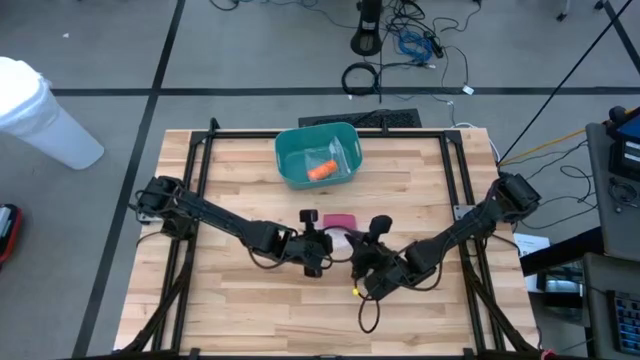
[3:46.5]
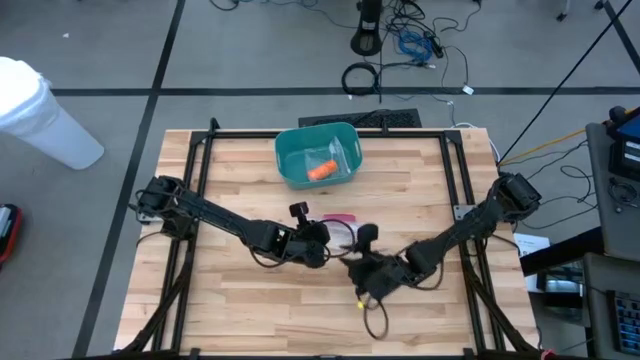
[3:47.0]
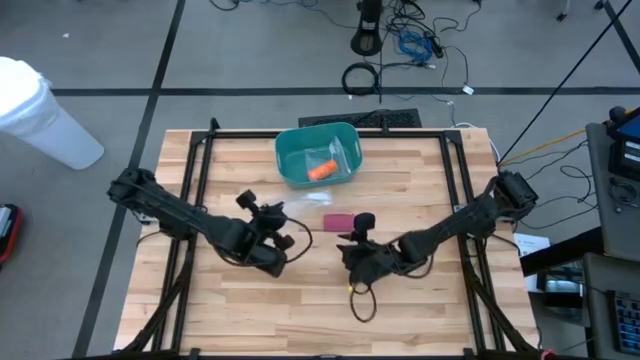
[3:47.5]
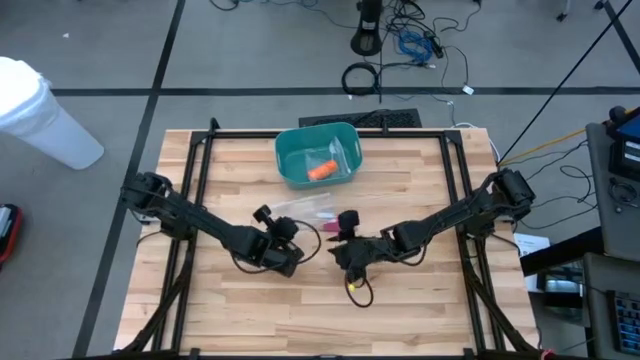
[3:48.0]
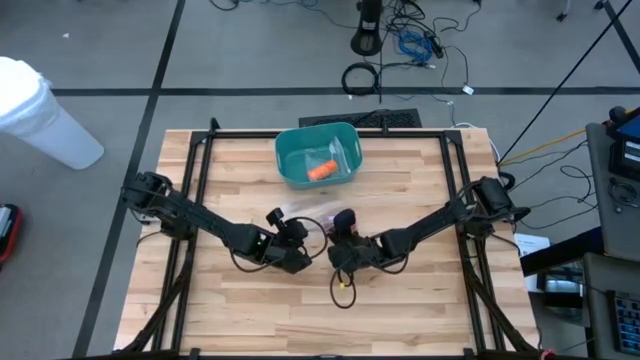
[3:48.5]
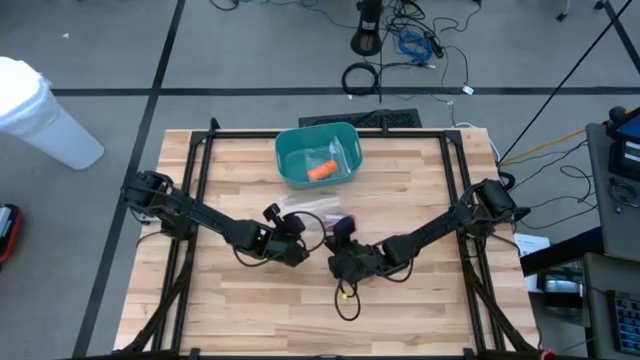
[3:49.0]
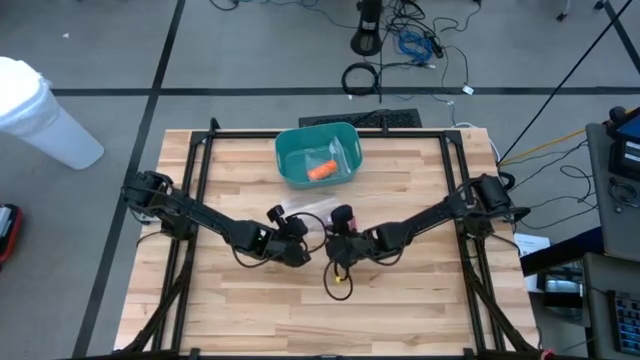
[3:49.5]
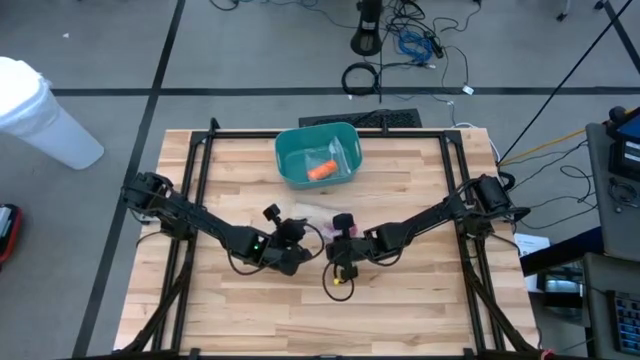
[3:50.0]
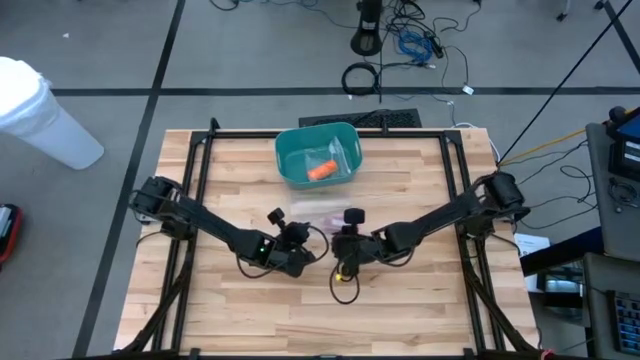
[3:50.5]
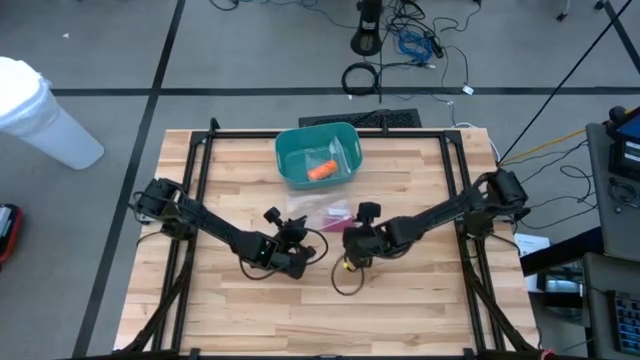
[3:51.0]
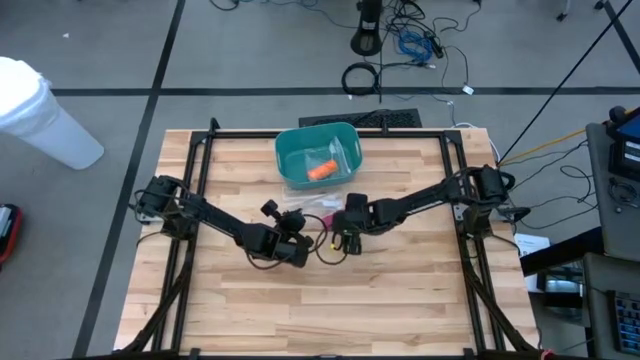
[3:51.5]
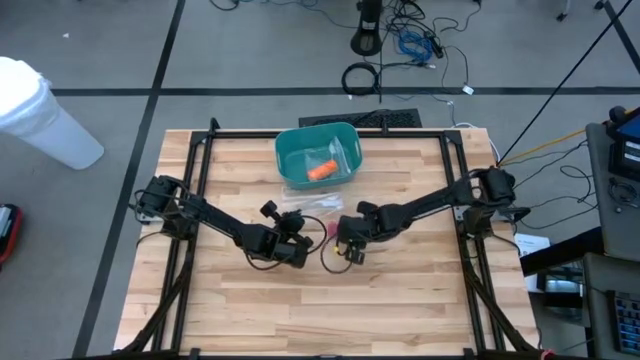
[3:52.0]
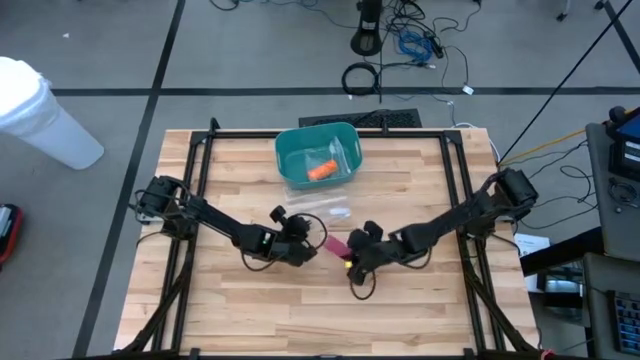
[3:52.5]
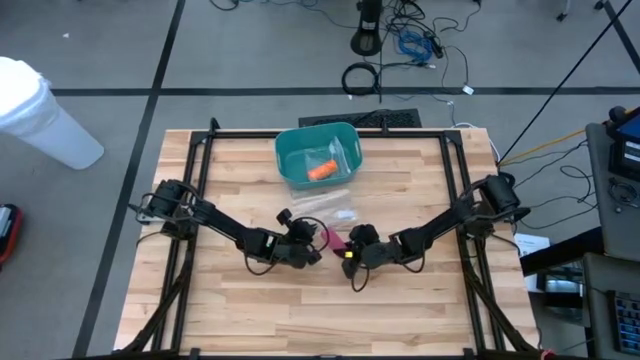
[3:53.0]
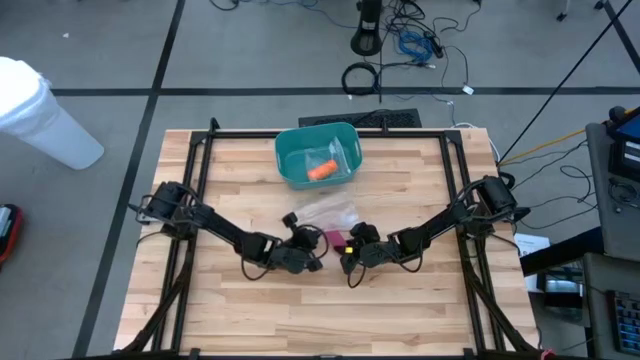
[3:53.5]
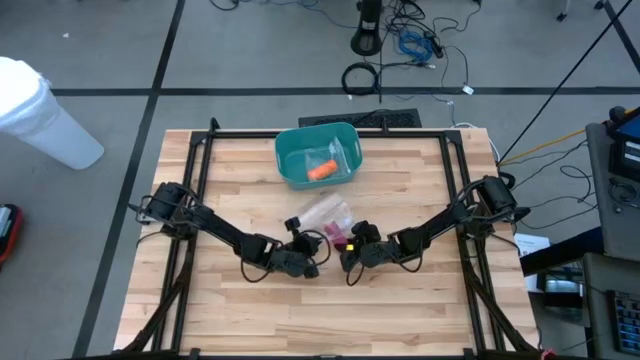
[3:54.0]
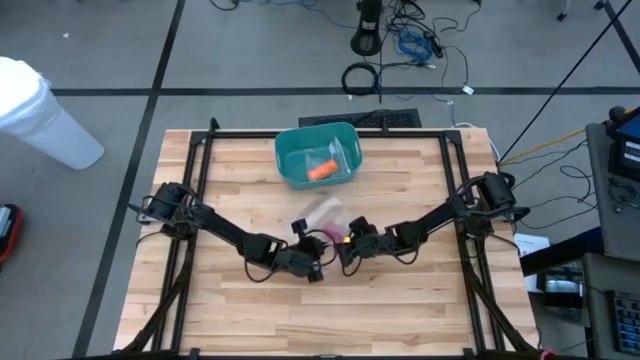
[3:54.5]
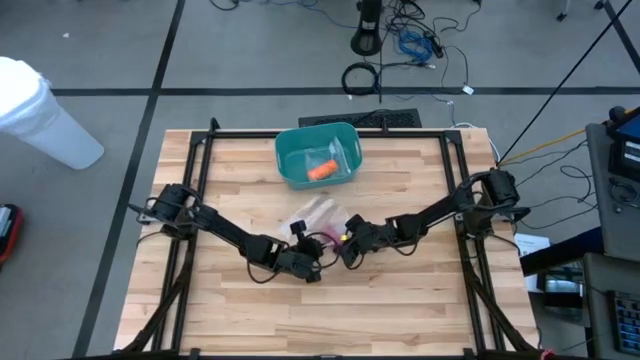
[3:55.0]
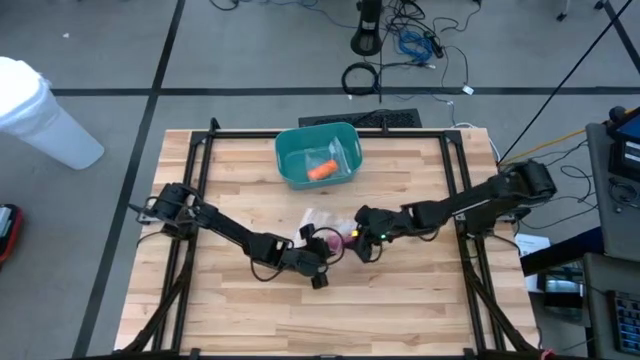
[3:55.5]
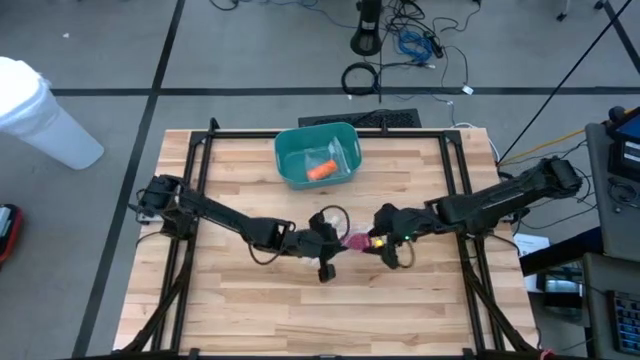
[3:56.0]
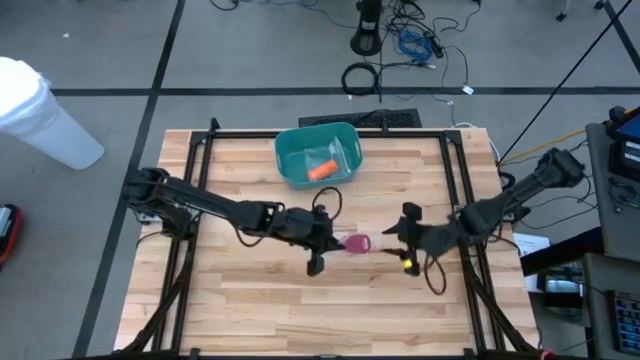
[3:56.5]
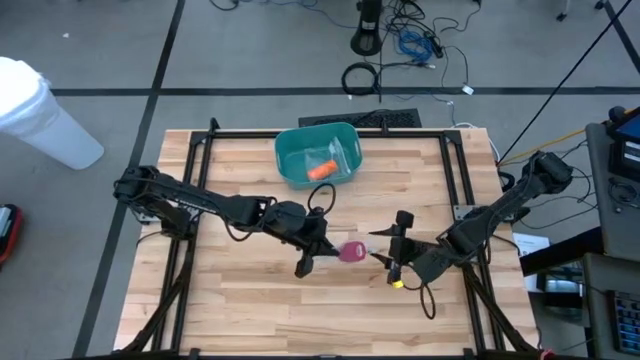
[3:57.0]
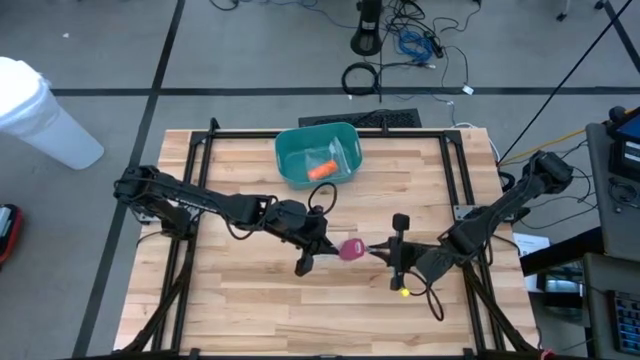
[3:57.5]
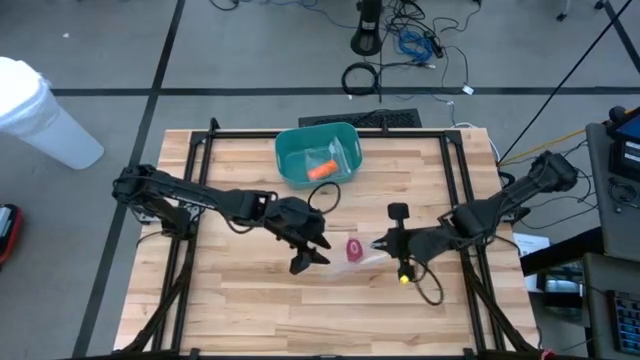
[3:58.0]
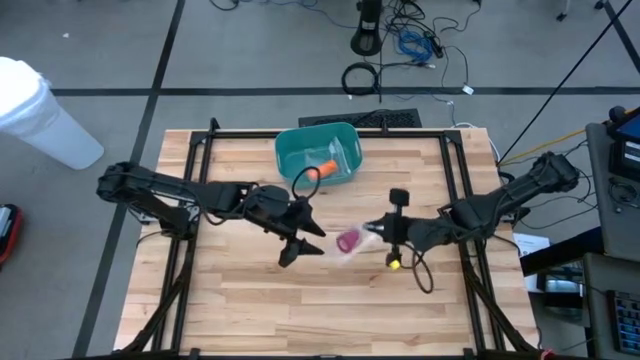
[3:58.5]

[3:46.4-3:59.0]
Task: Roll bandage
Put the pink bandage into the transparent zip bag

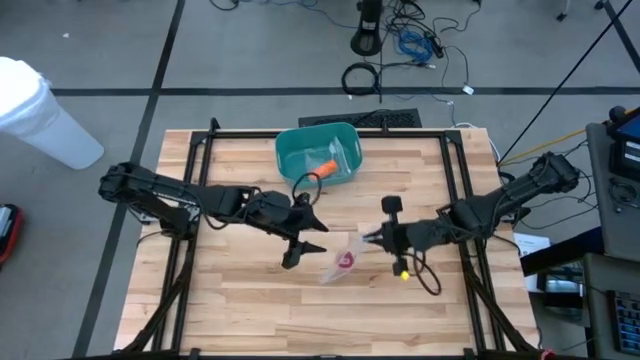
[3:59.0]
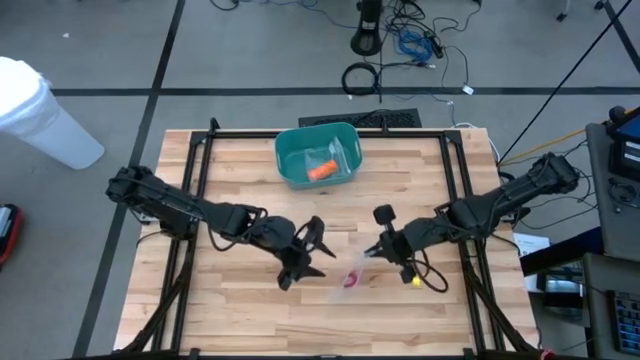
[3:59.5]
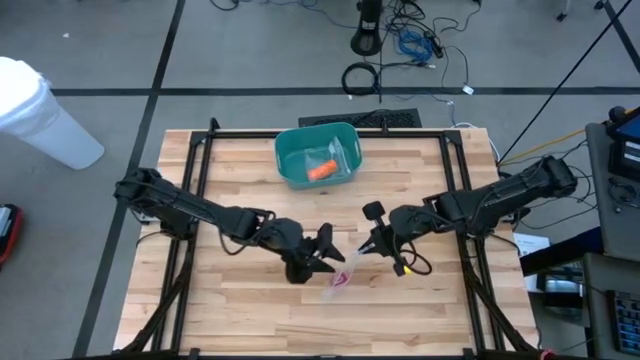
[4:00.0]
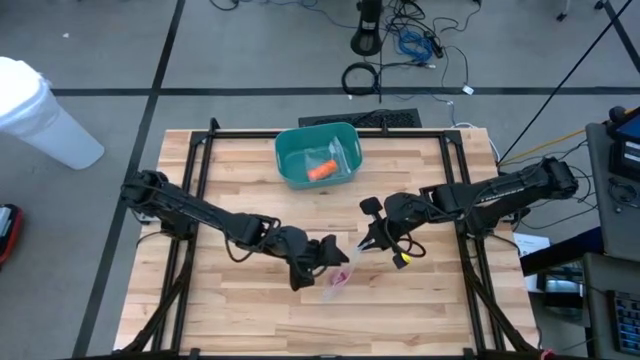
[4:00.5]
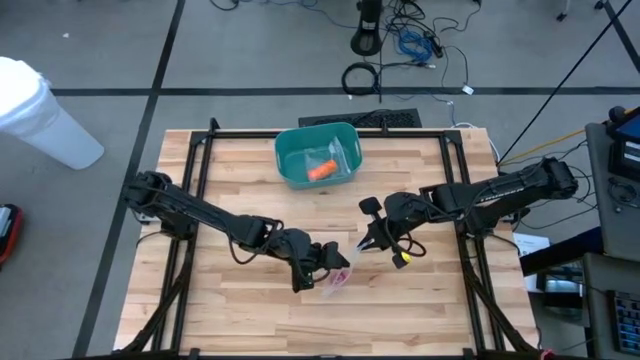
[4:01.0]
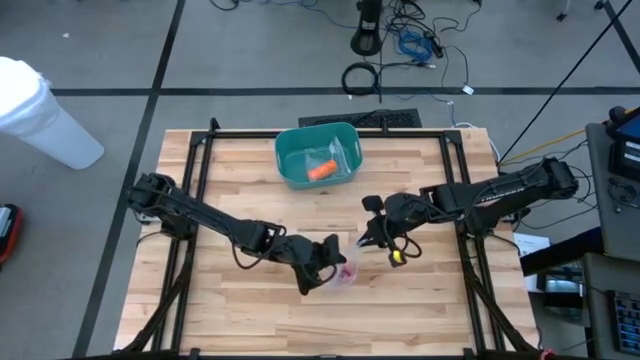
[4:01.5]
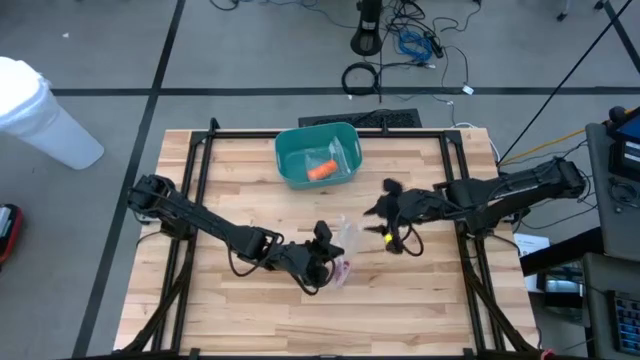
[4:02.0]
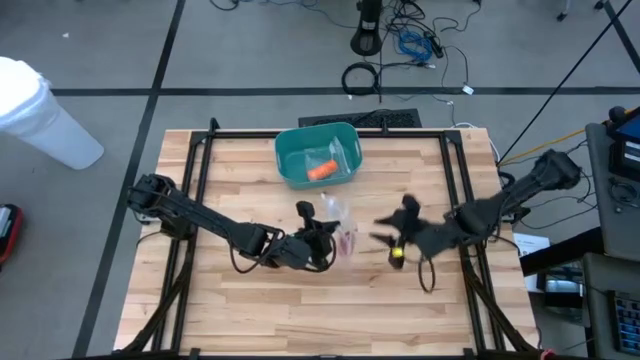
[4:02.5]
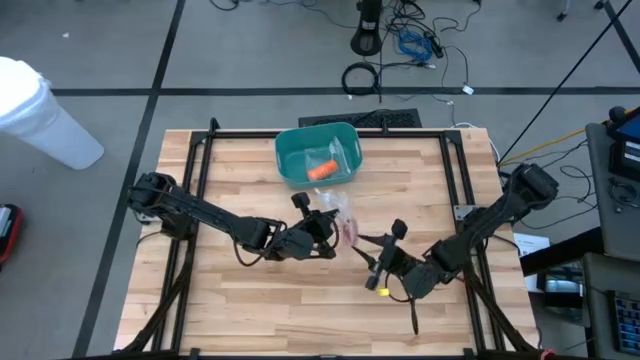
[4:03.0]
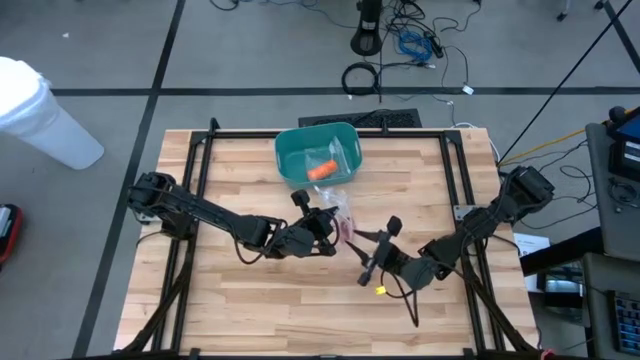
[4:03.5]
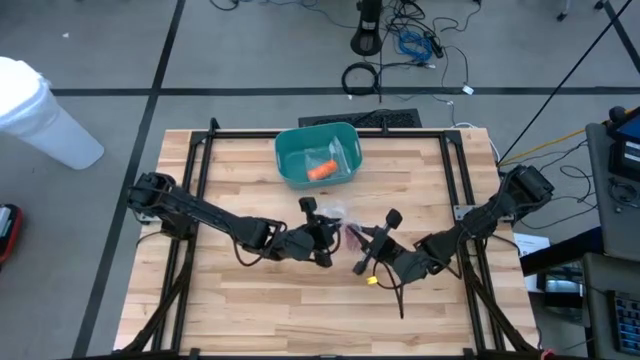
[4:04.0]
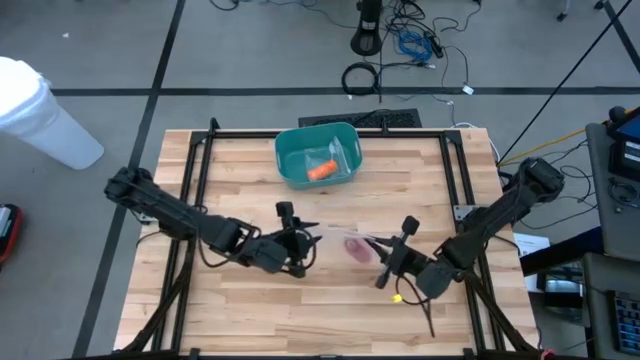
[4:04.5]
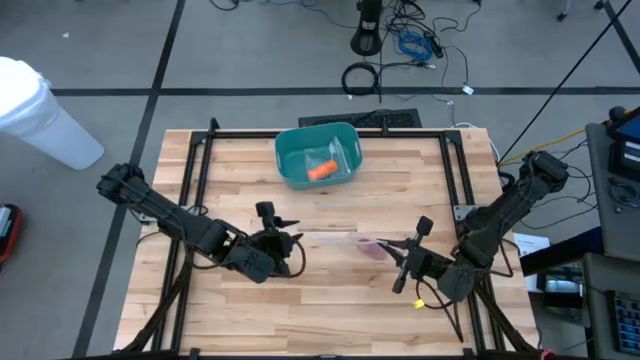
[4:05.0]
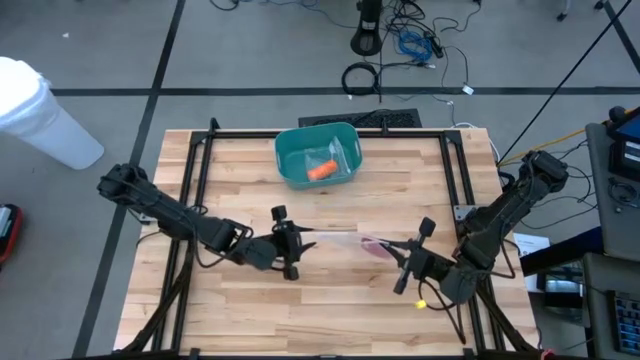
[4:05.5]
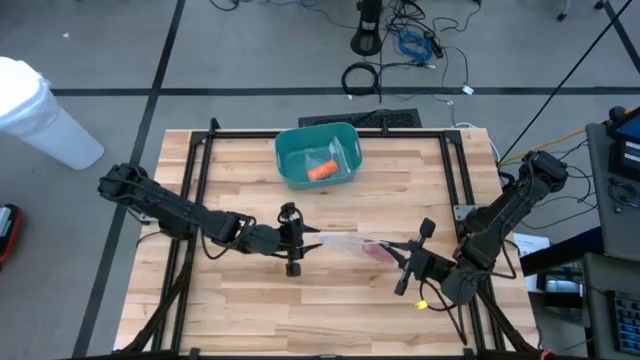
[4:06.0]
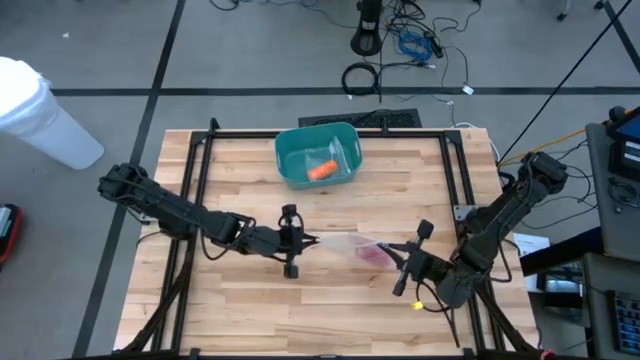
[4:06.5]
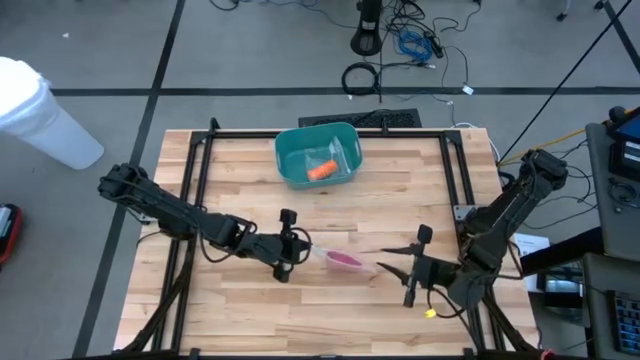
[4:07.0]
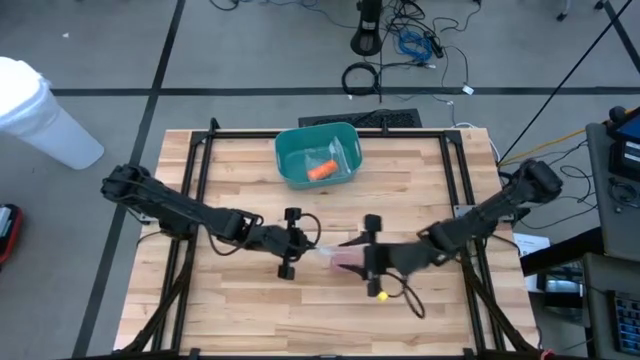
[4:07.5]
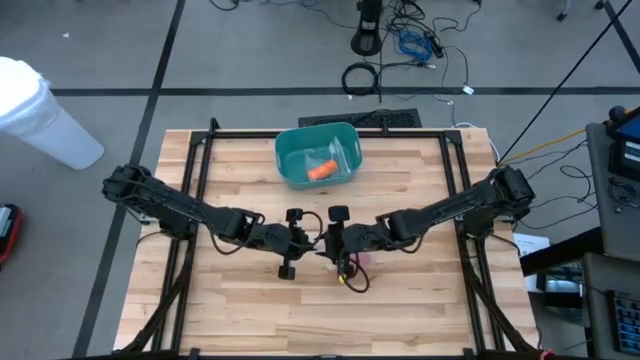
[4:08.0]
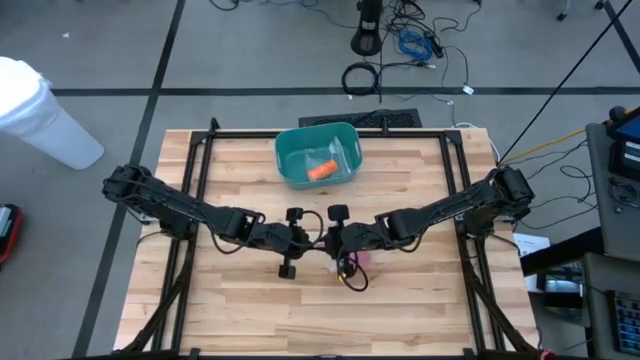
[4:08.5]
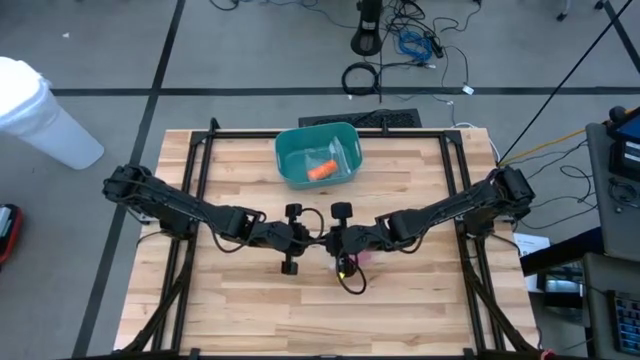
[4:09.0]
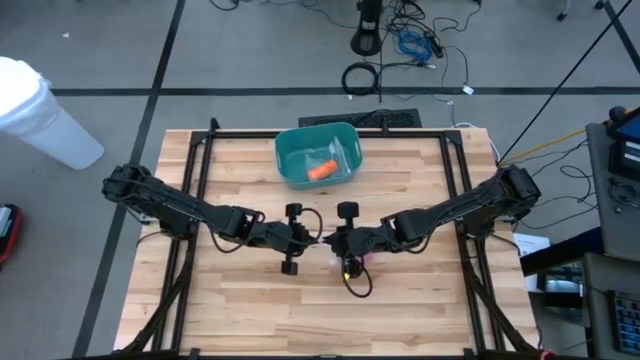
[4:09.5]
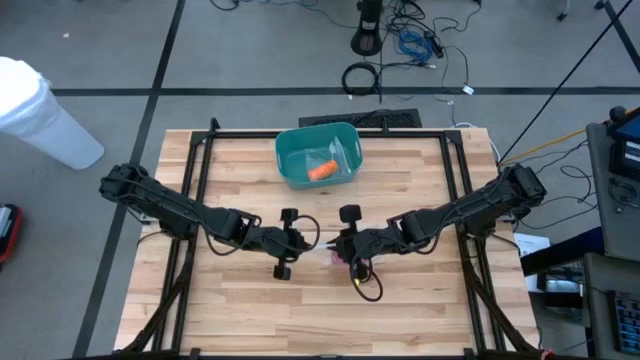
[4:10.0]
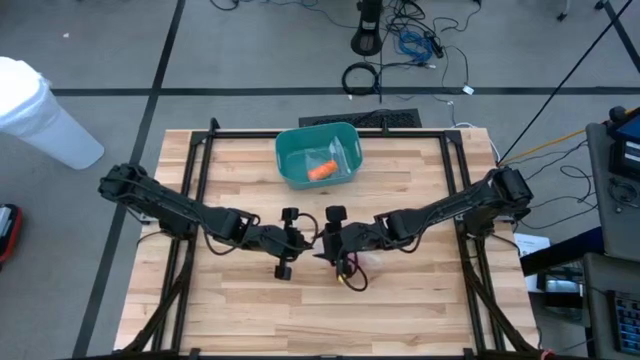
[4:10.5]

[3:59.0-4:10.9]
Close the transparent zip bag
